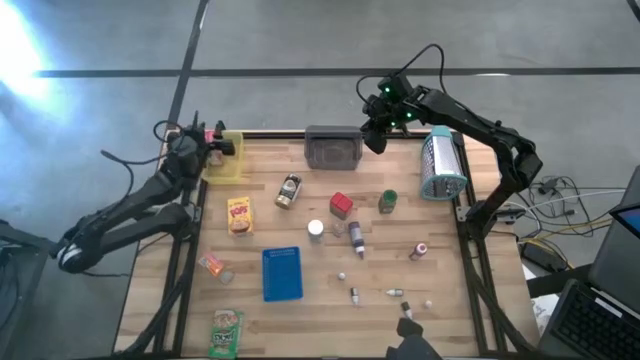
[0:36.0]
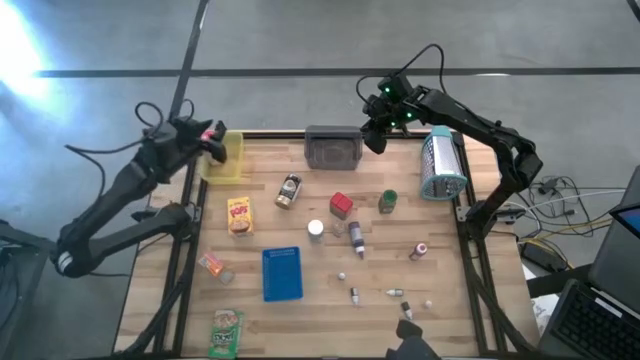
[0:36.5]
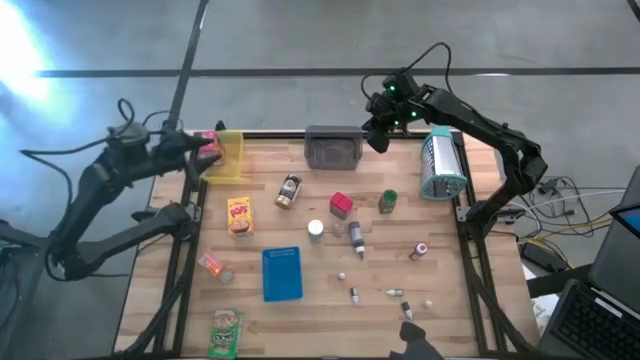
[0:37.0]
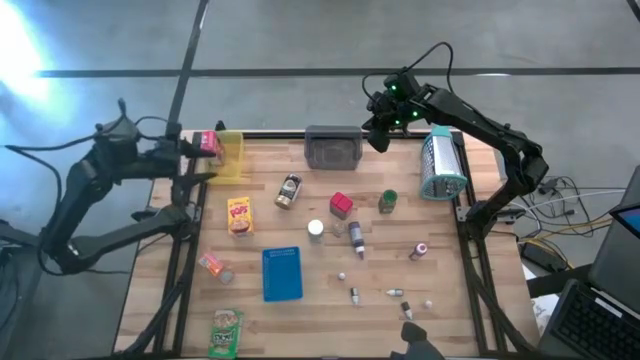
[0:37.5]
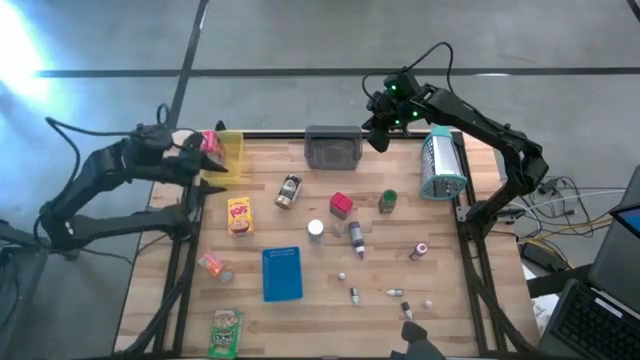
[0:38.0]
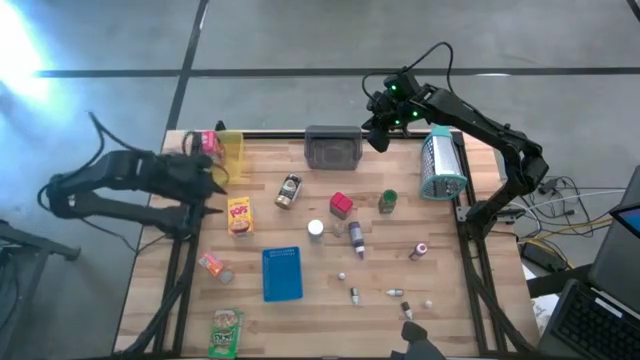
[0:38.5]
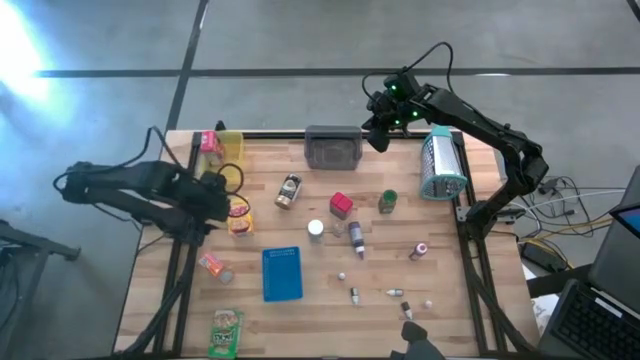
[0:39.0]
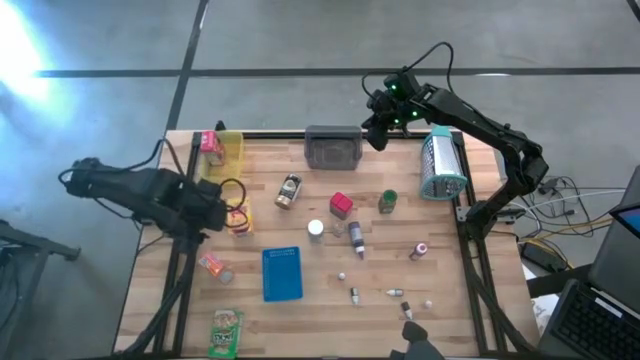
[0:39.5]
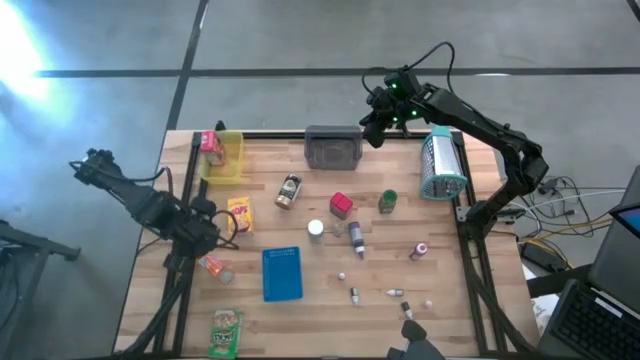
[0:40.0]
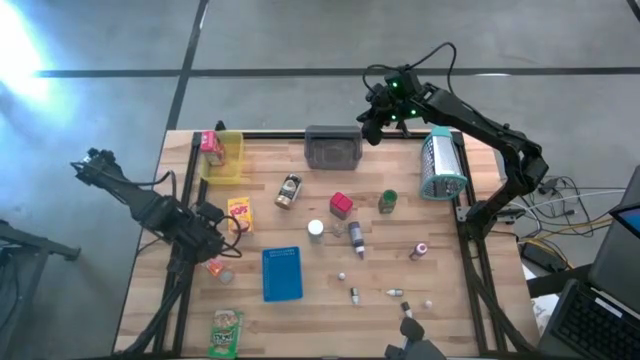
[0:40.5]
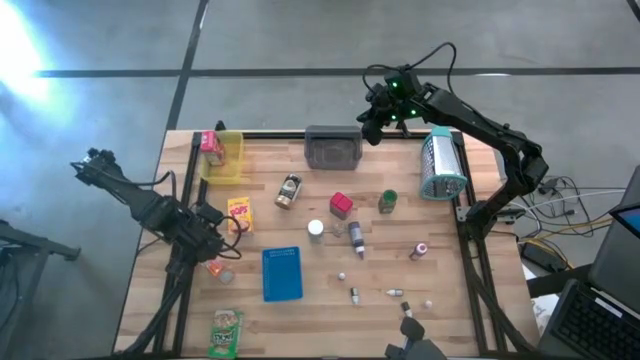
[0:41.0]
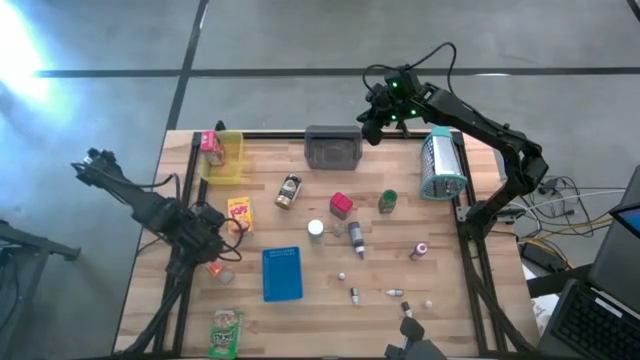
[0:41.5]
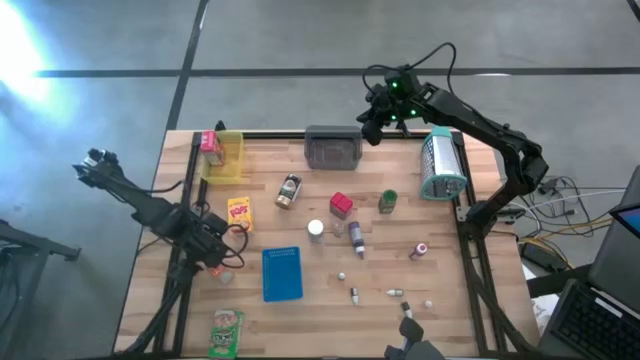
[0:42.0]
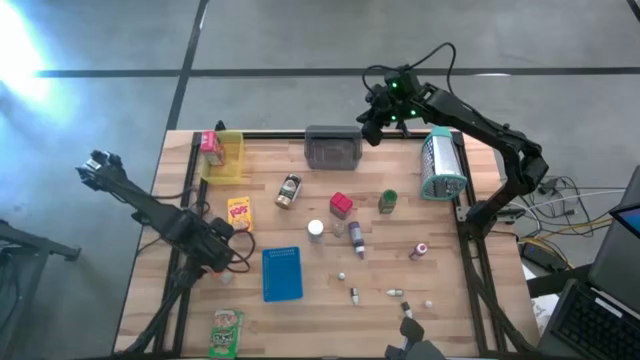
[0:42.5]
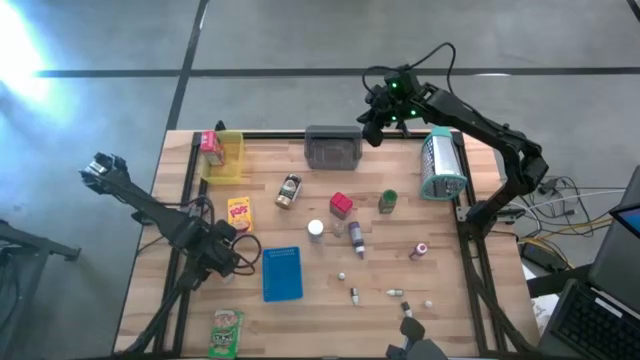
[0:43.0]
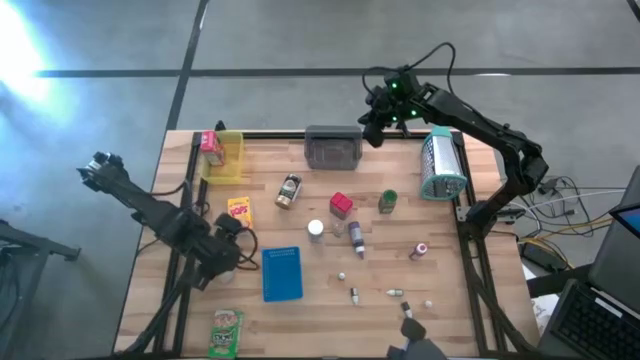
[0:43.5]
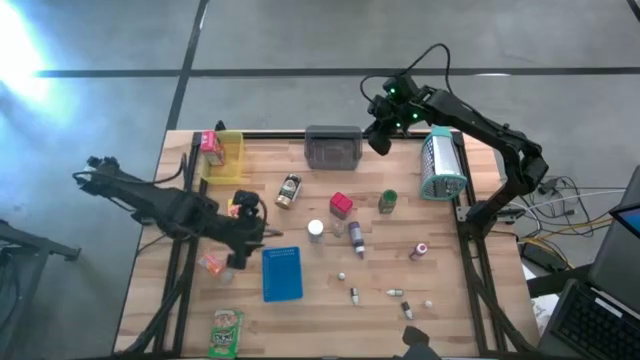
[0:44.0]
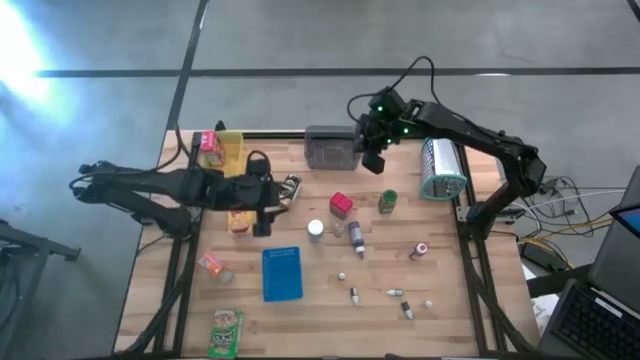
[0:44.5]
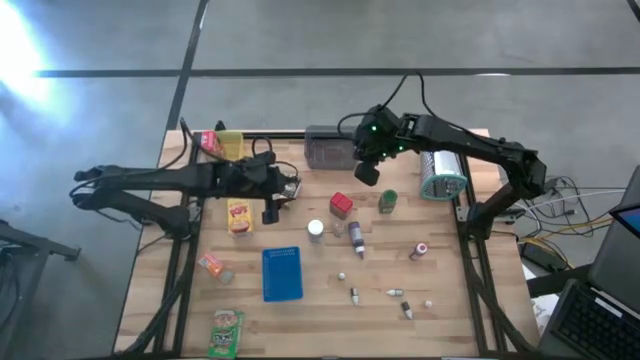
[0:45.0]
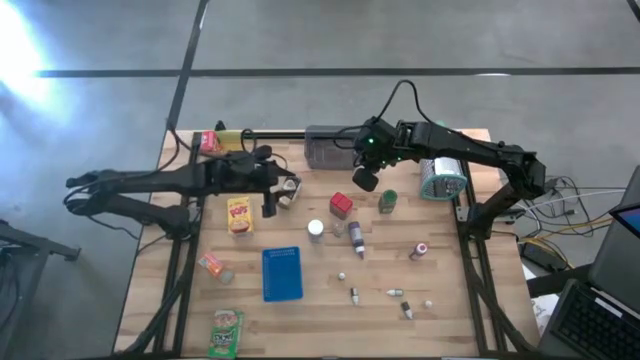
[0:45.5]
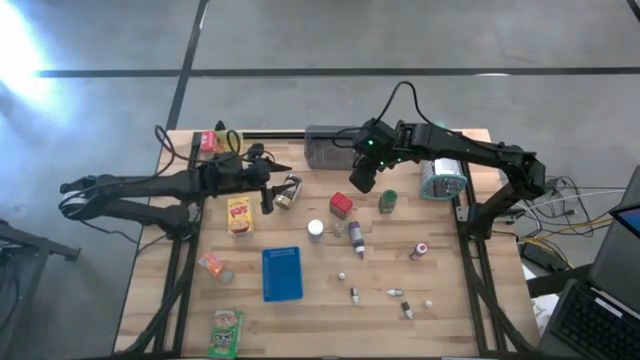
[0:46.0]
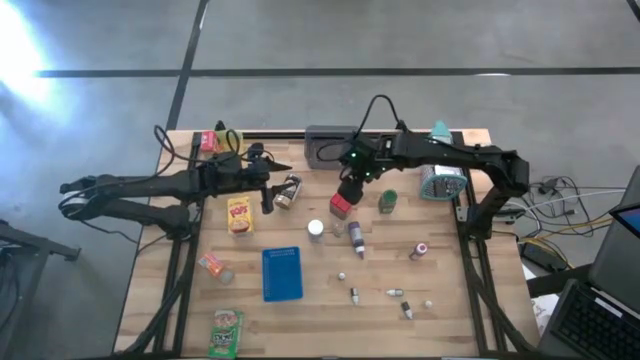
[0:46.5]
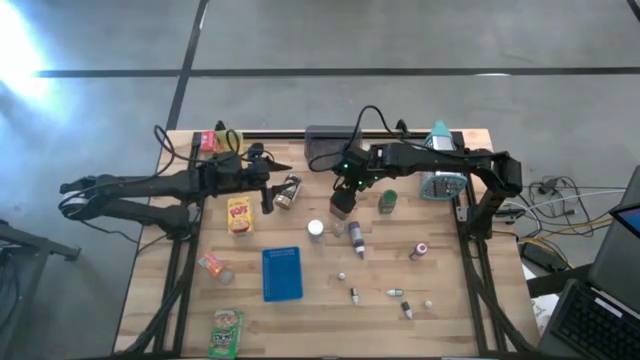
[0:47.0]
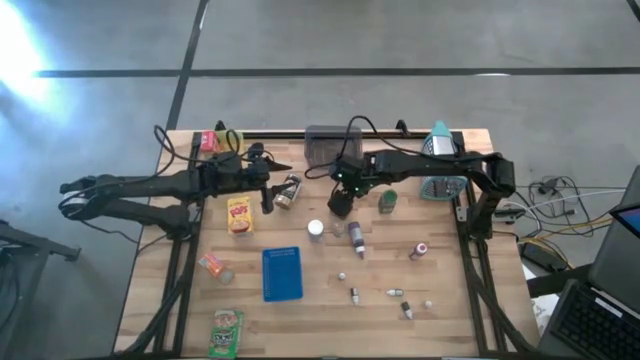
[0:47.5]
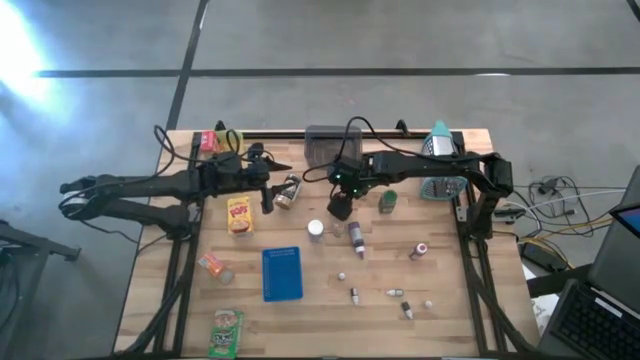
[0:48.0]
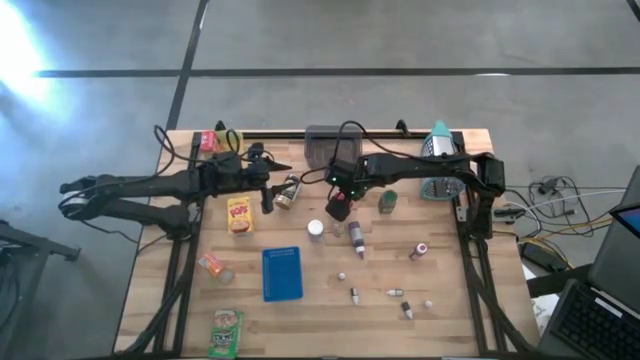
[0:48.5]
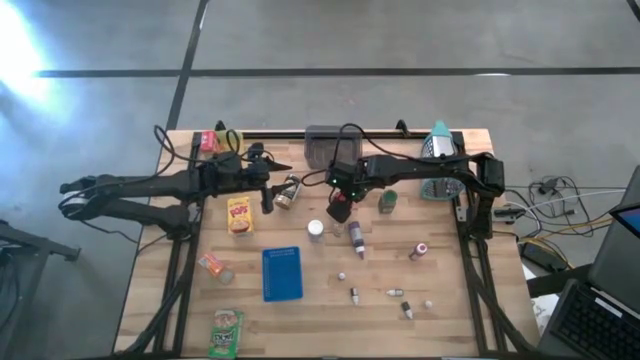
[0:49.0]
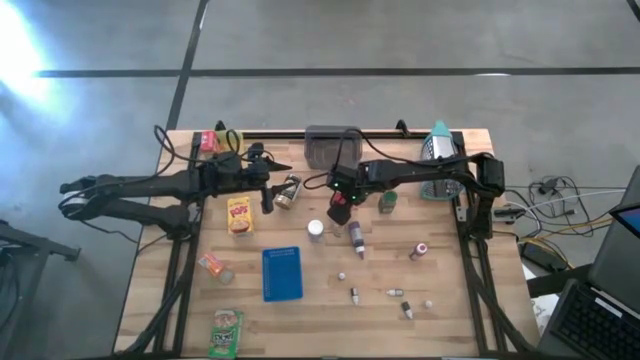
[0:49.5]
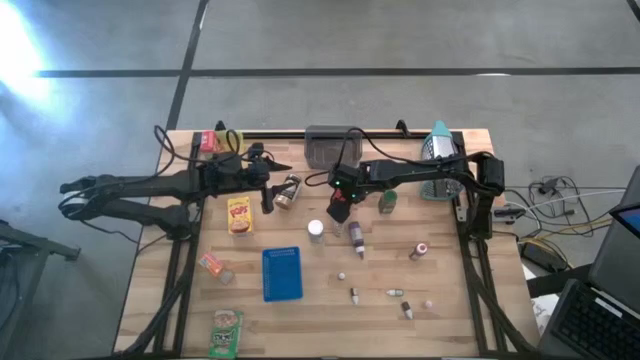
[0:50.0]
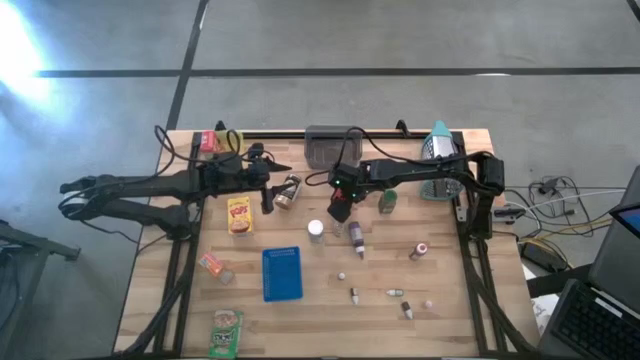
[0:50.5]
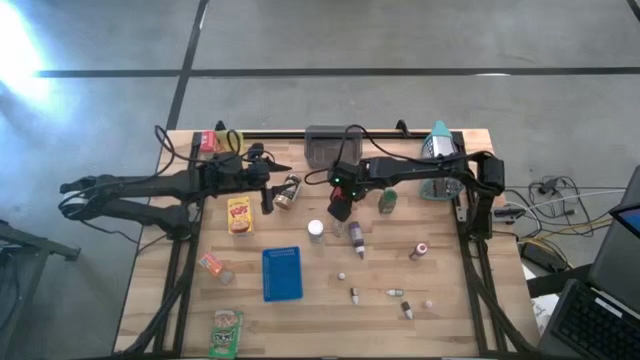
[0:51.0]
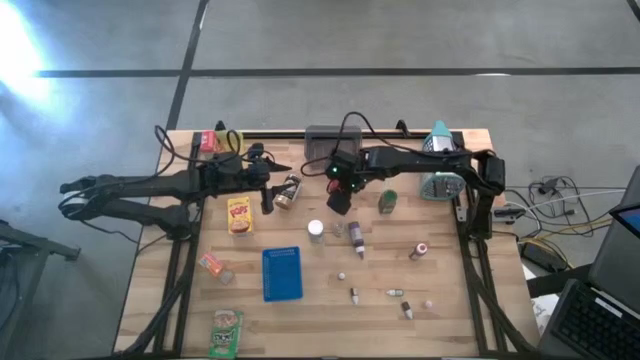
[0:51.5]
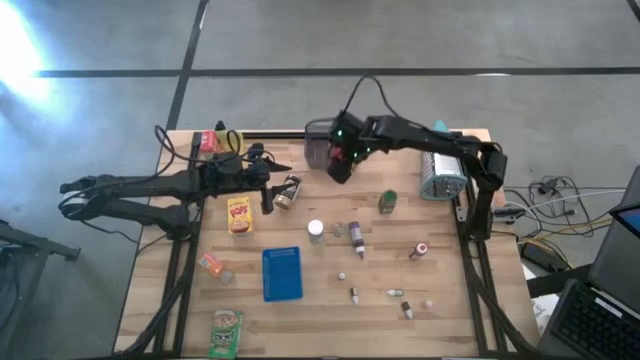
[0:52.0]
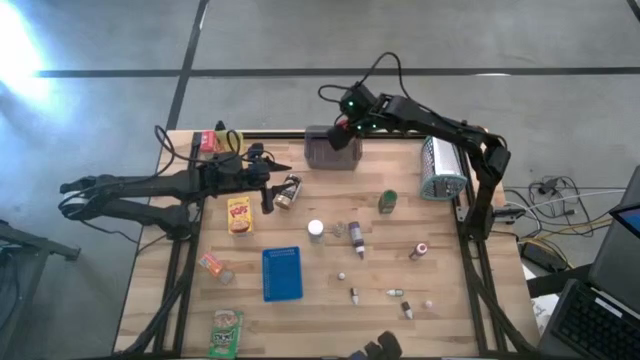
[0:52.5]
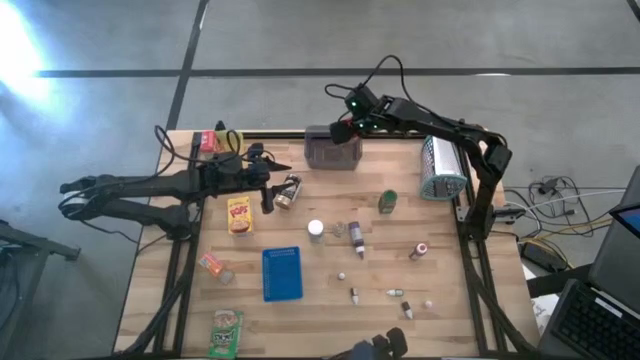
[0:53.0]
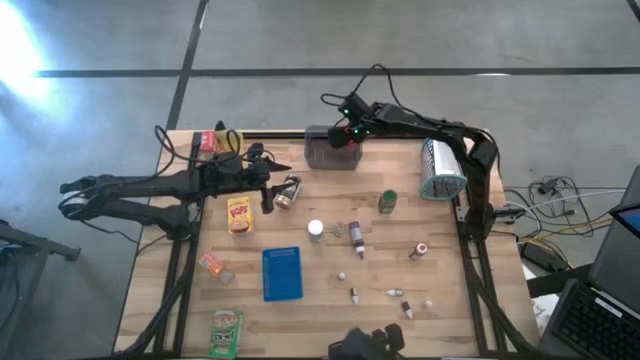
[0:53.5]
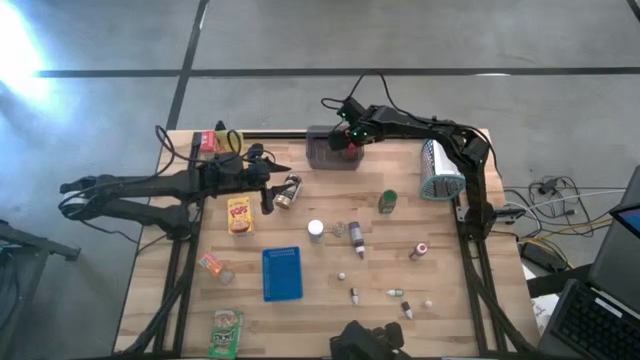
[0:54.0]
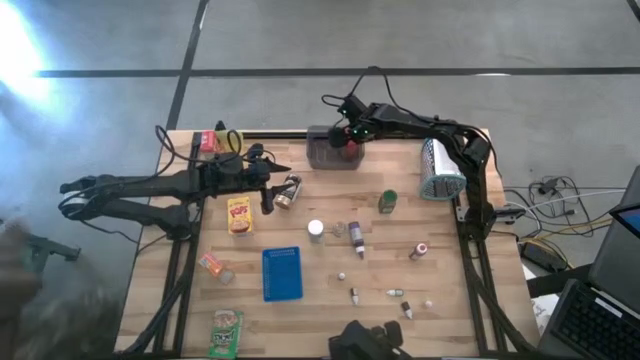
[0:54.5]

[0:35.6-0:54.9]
Task: Pick & Place Kitchen Items
Put the red spice can into the black bin

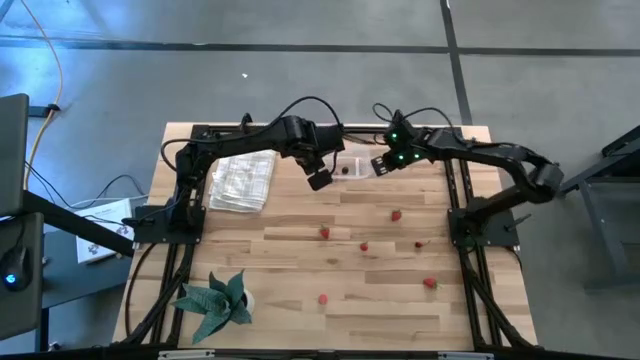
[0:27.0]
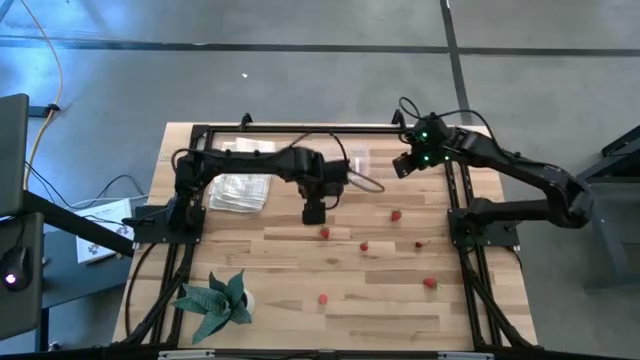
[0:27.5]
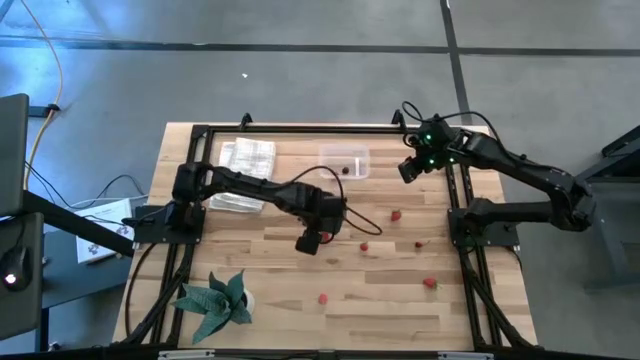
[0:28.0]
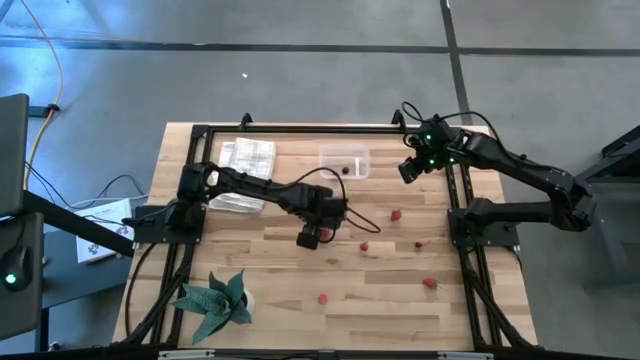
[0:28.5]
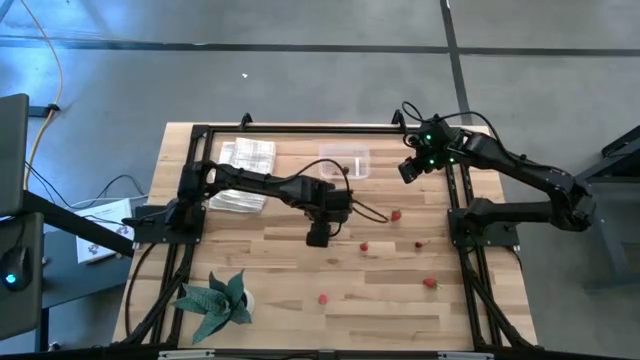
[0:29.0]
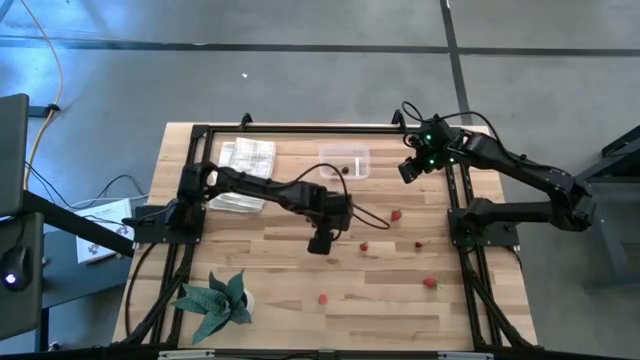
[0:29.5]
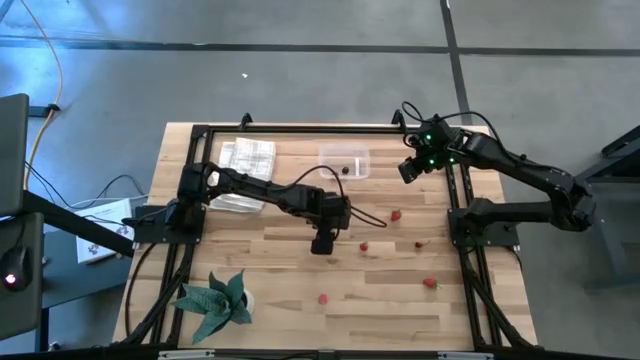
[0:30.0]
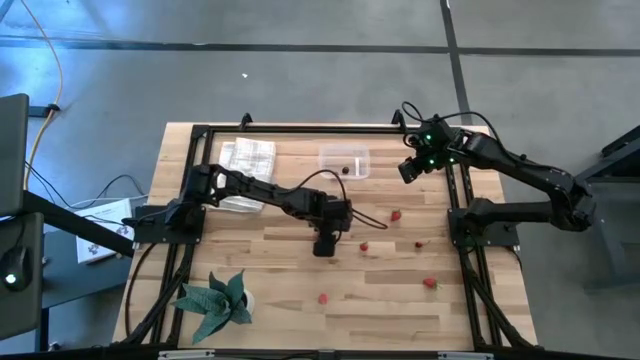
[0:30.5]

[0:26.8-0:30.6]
Task: Pick and placing Produce into tupperware
Put the red strawberry into the transparent container
